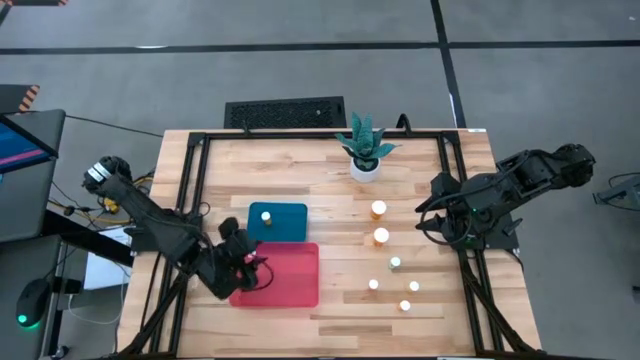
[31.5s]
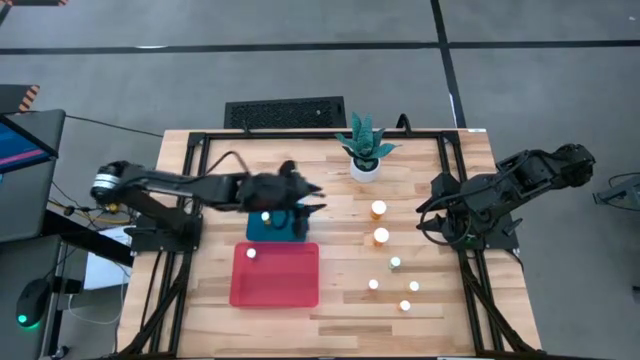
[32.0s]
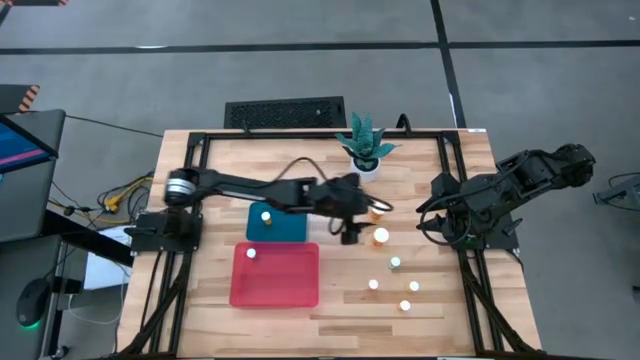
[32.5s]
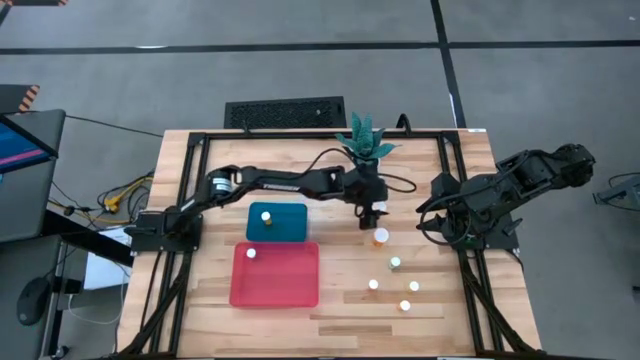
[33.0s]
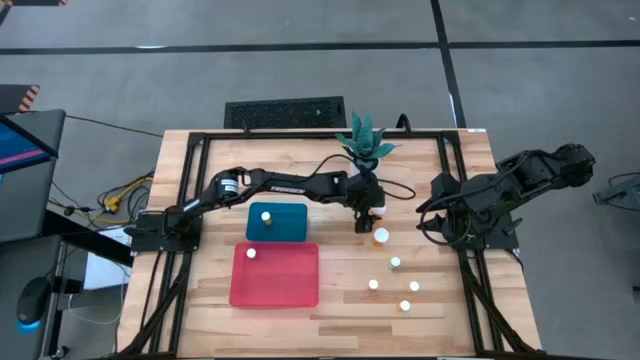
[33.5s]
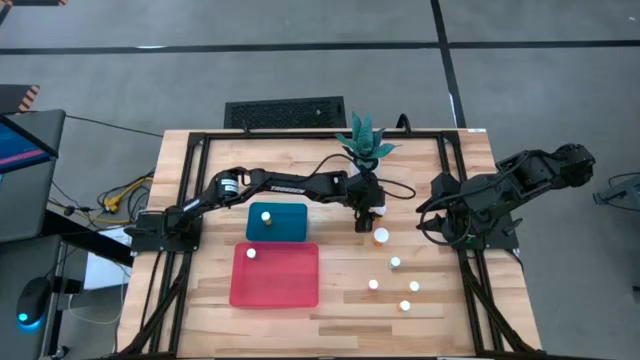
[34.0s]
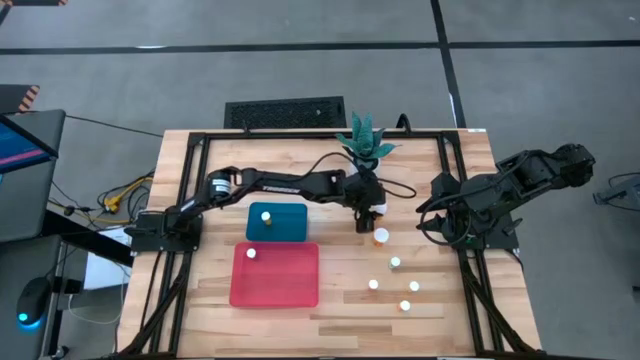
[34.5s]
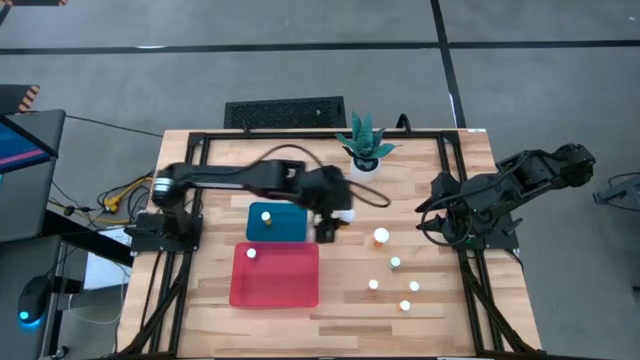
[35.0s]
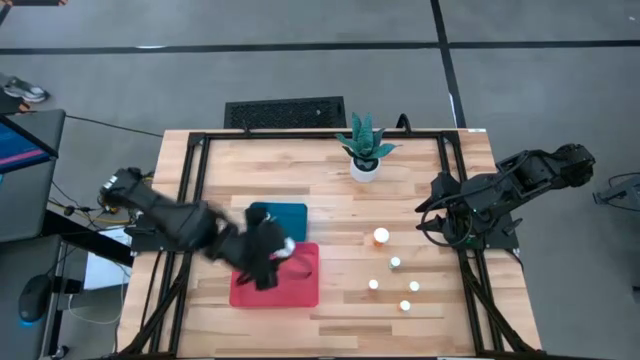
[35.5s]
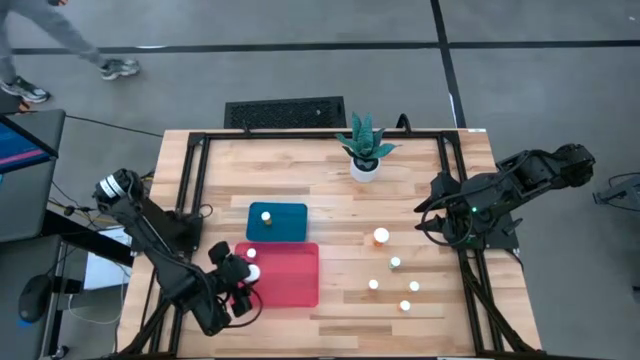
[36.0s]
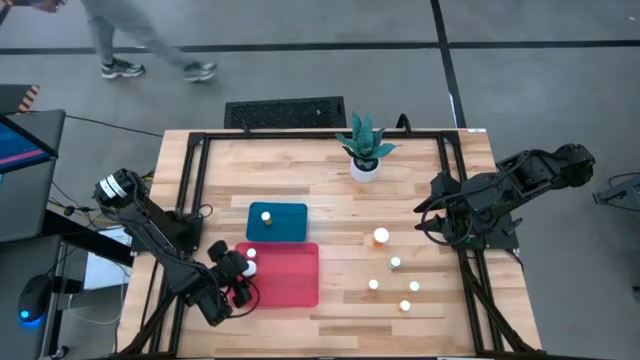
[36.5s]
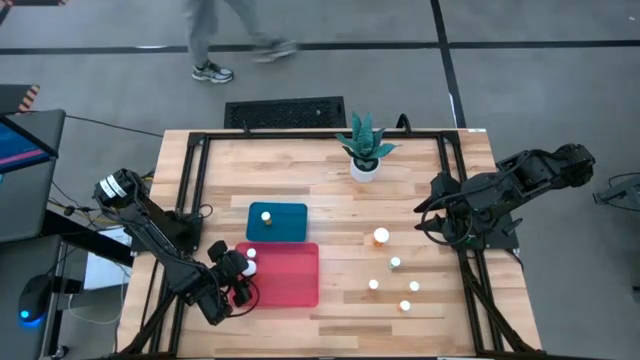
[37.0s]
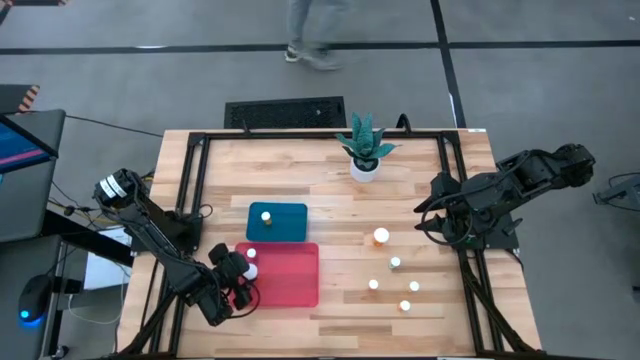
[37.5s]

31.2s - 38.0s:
Task: Pick and place medicine bottles into bin by pill shape (circle, oval)
Put the large orange capsule bottle into the red bin

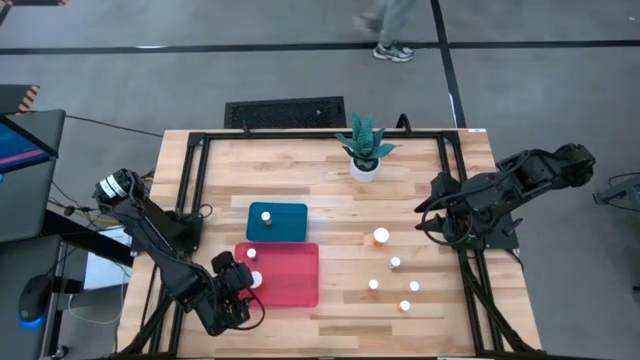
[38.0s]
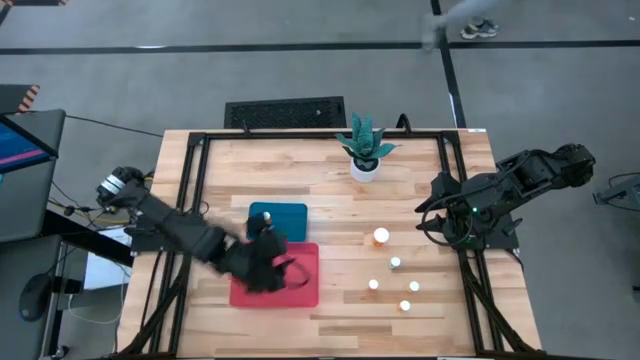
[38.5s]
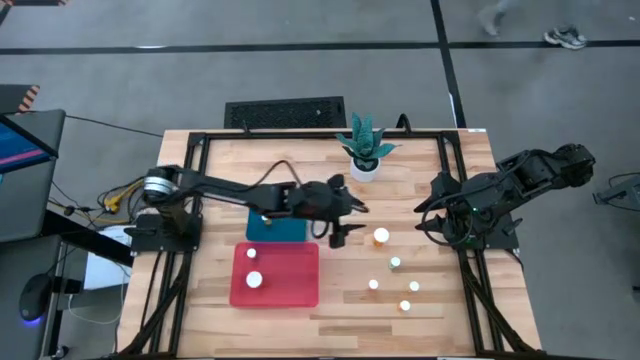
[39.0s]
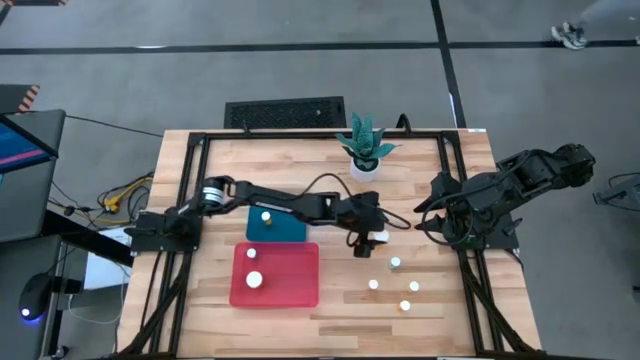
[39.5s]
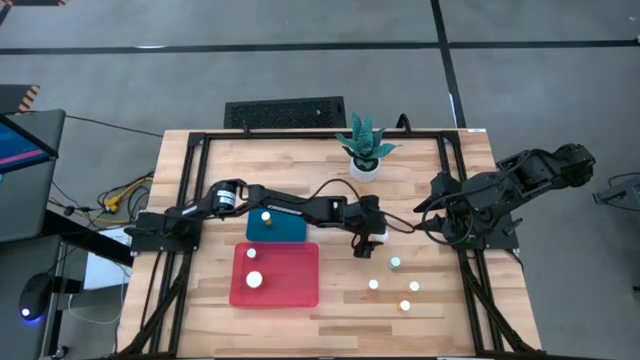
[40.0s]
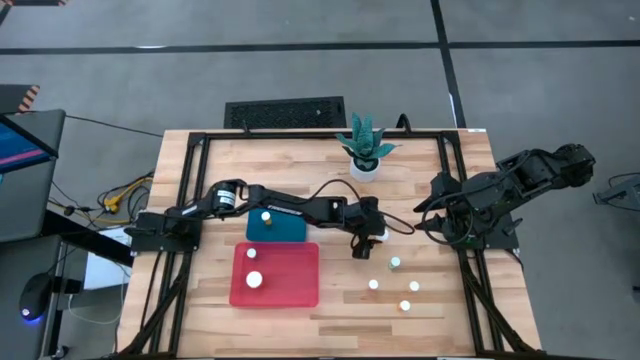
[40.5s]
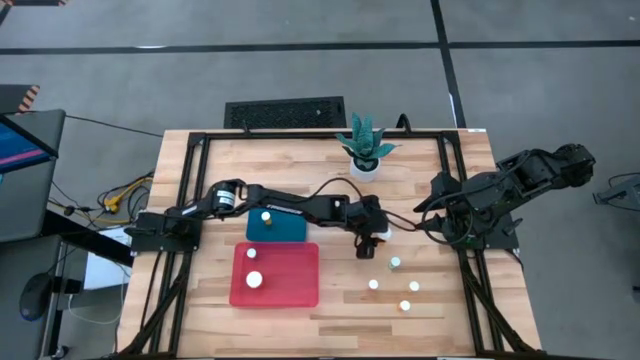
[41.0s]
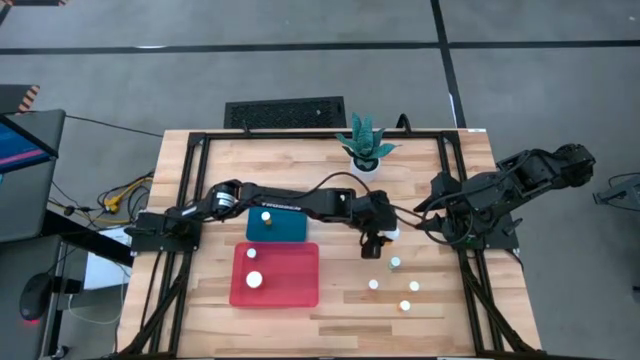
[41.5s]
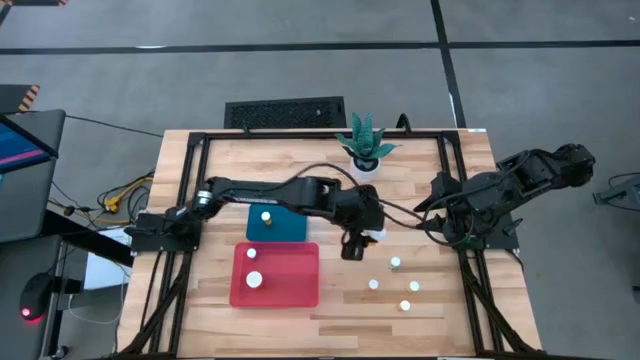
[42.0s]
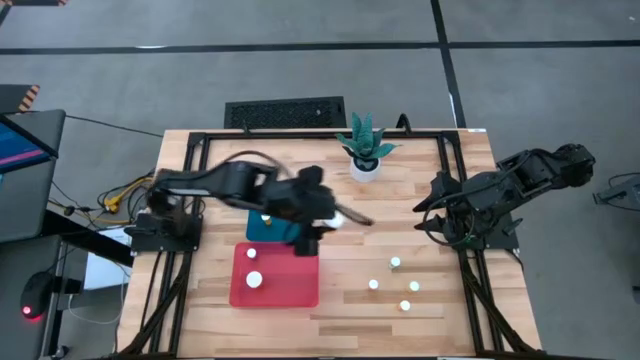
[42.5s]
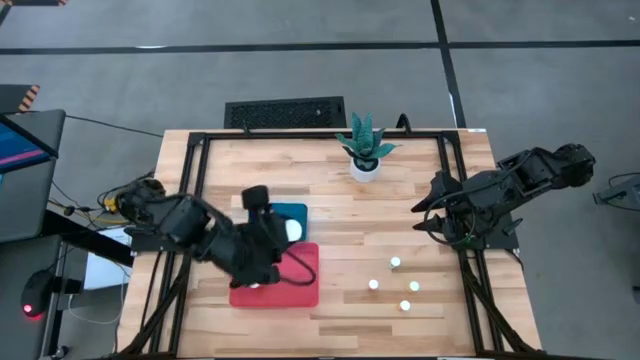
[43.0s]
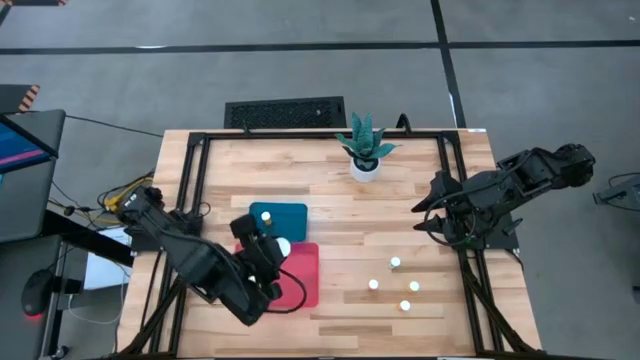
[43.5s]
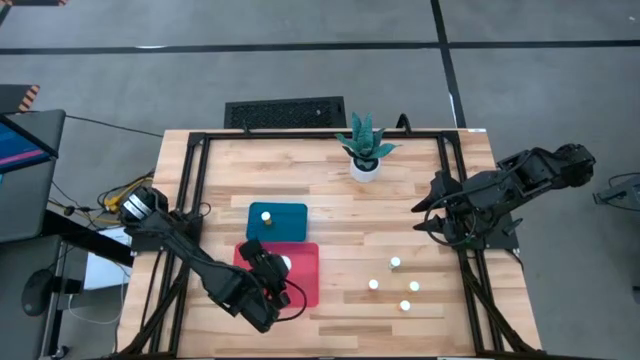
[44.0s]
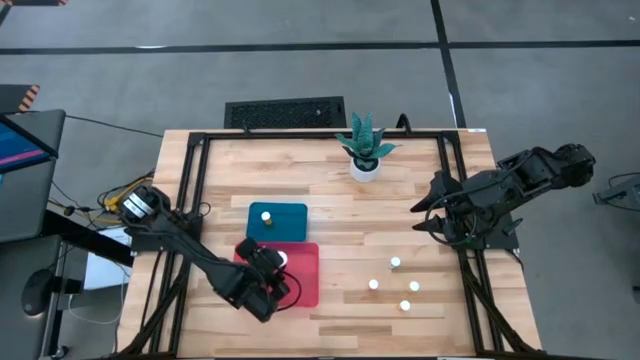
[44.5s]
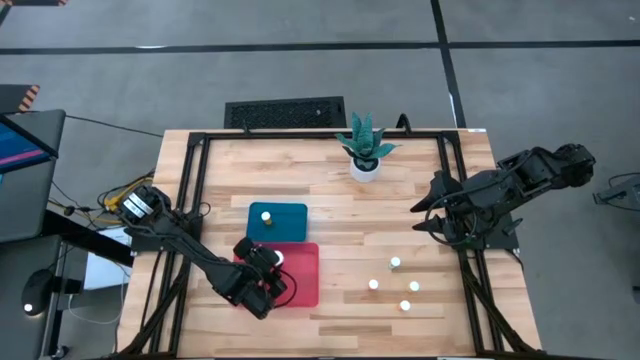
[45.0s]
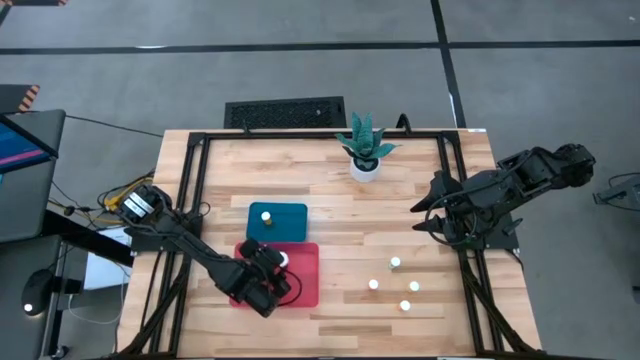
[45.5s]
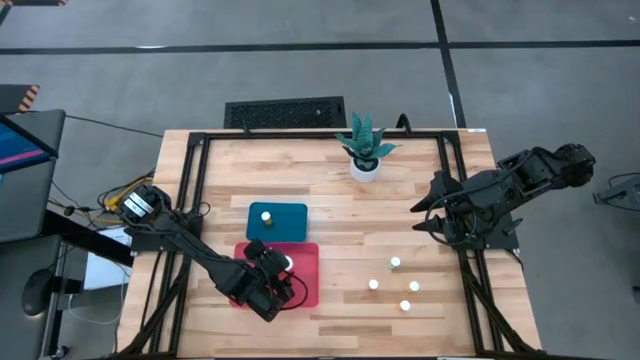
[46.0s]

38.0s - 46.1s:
Put the large orange capsule bottle into the red bin

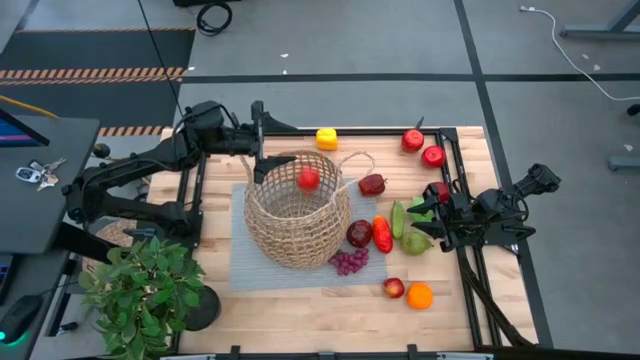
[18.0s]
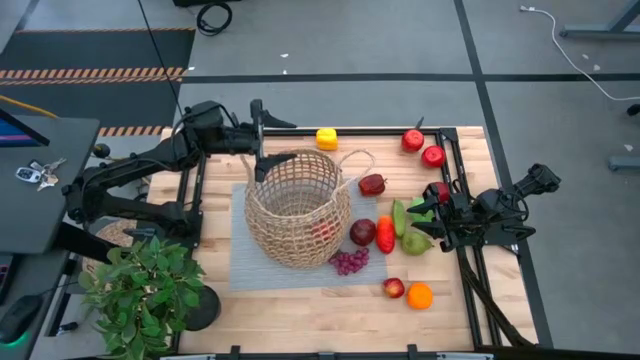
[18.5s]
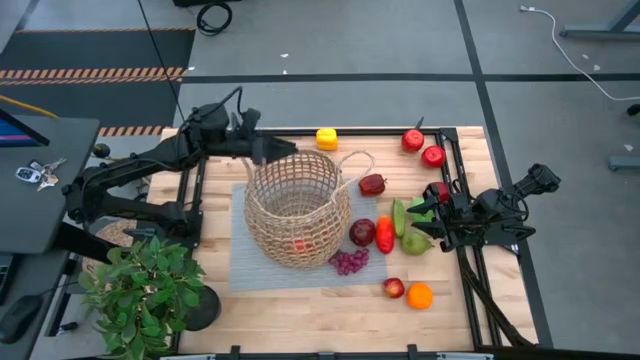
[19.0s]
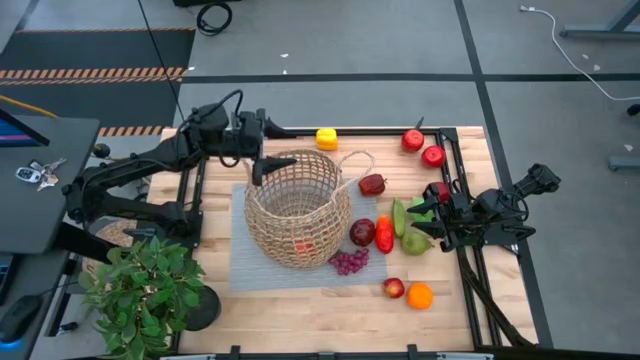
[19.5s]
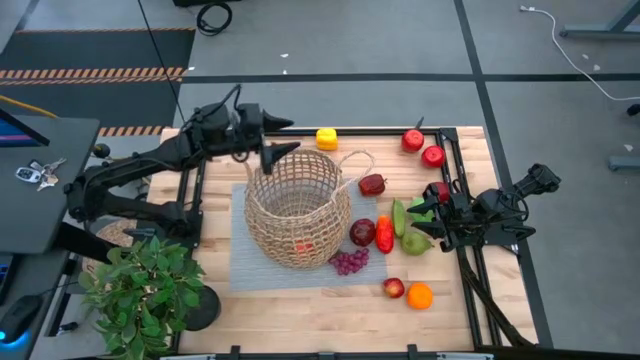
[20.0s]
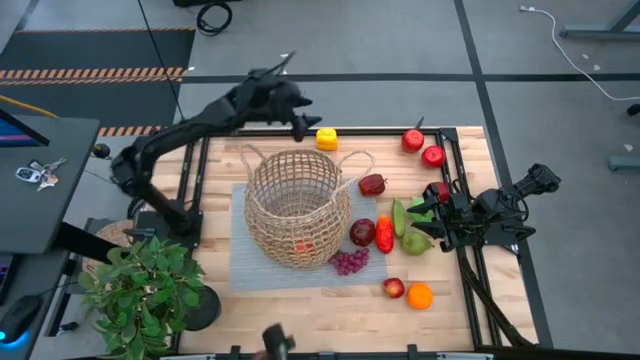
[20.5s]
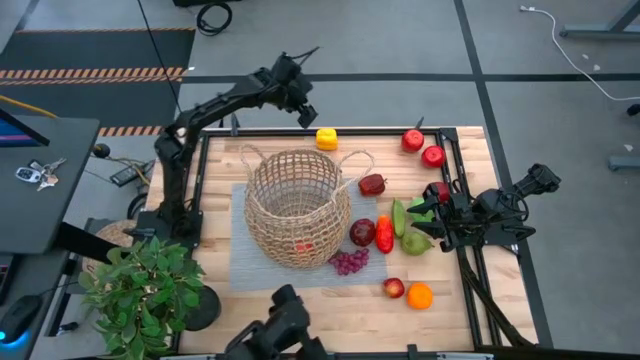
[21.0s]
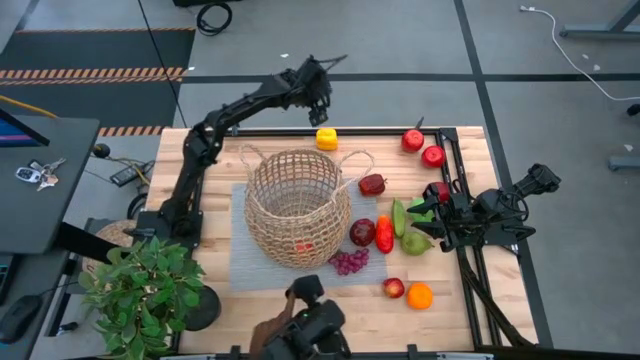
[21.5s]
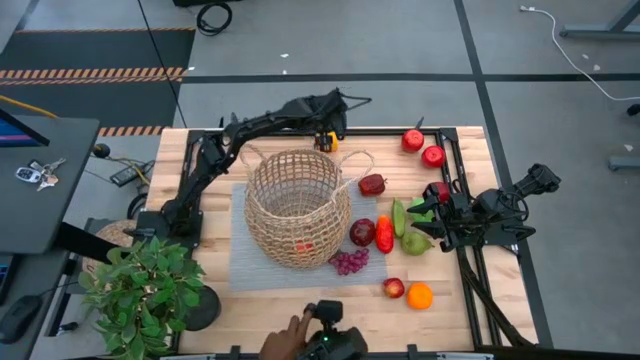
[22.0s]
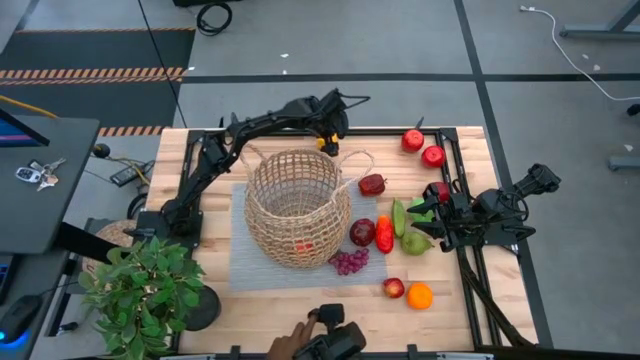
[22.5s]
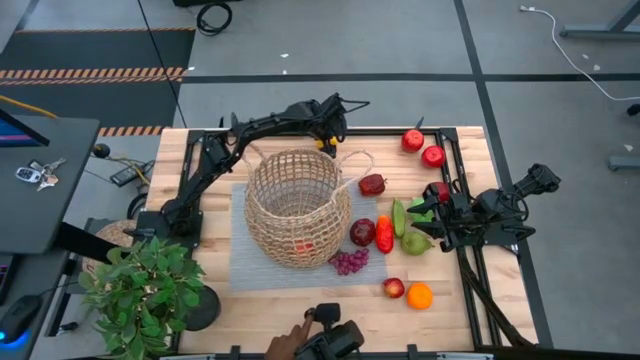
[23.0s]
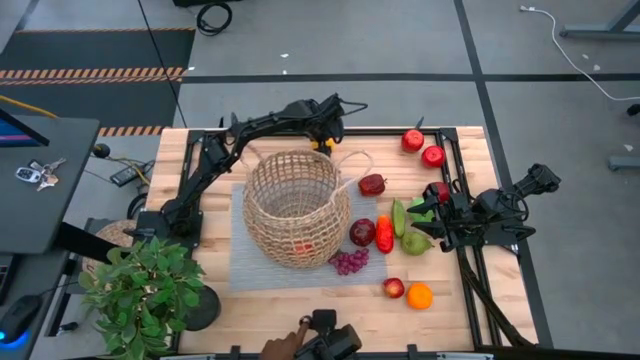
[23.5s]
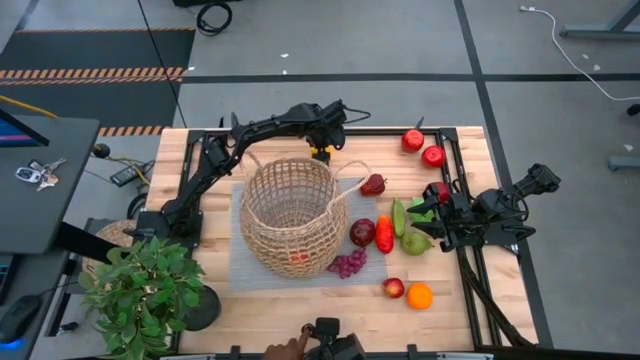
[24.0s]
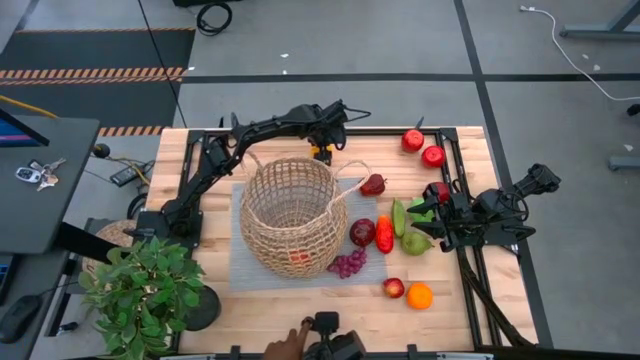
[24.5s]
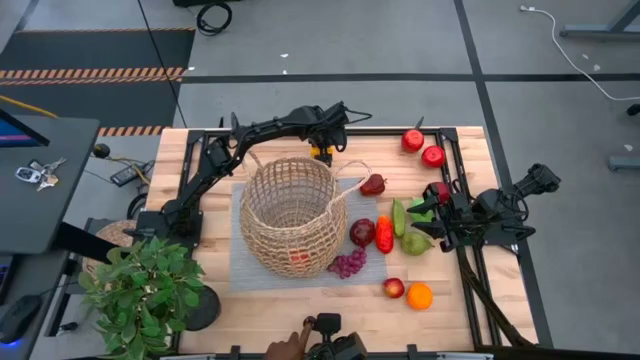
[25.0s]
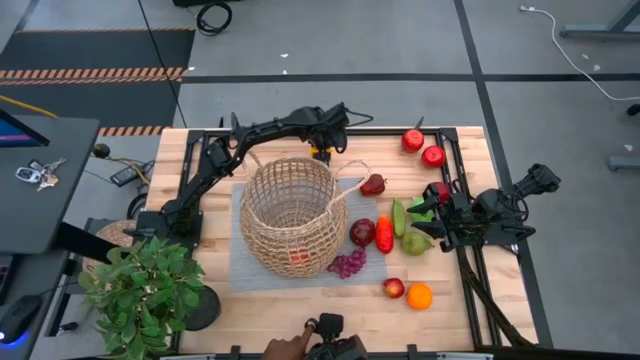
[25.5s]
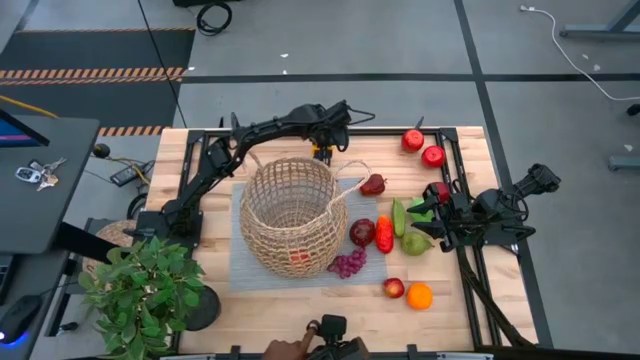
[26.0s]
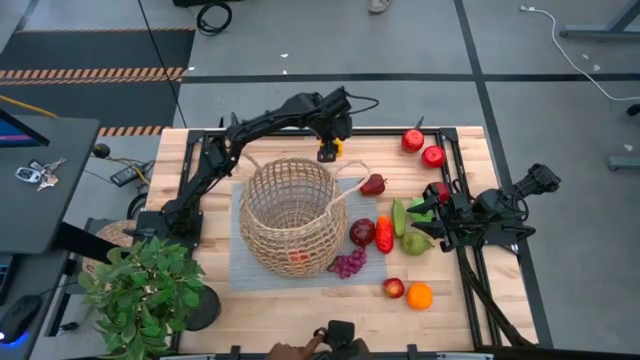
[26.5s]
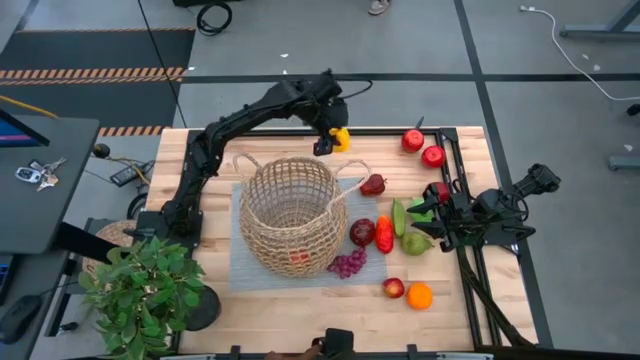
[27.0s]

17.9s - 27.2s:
Task: Build produce basket
Put the bell pepper into the brown basket
